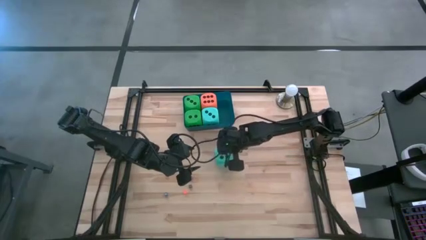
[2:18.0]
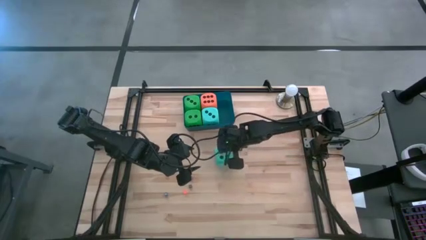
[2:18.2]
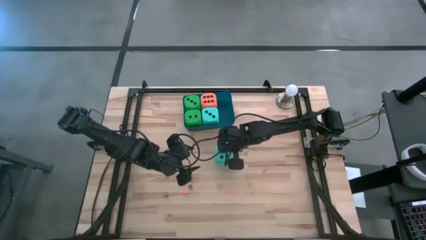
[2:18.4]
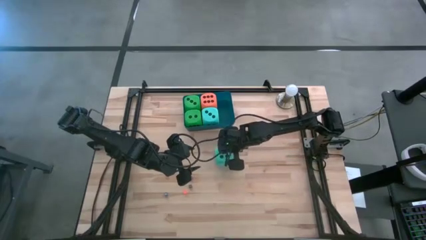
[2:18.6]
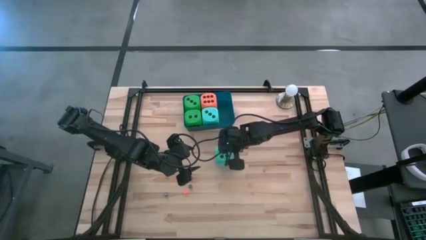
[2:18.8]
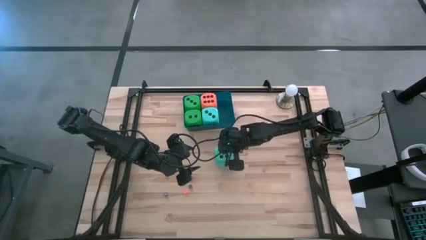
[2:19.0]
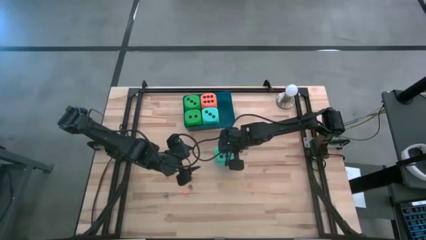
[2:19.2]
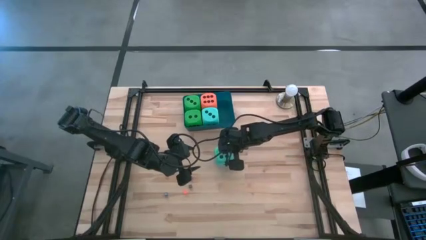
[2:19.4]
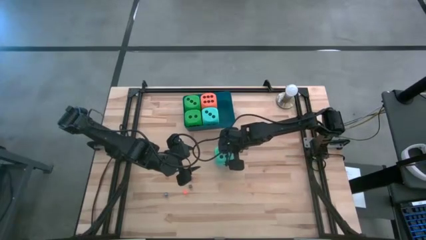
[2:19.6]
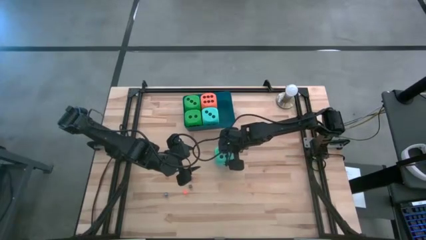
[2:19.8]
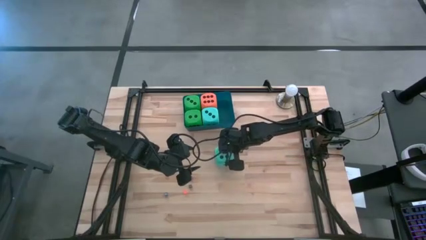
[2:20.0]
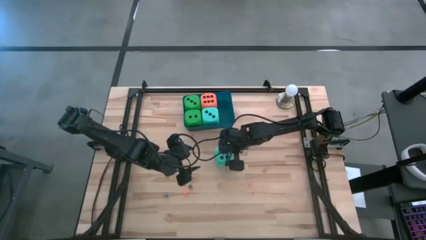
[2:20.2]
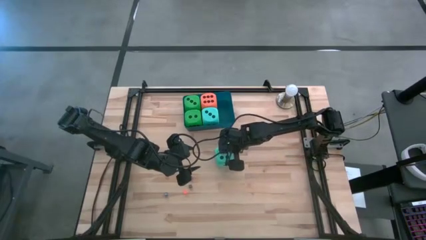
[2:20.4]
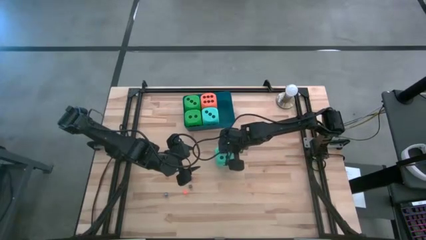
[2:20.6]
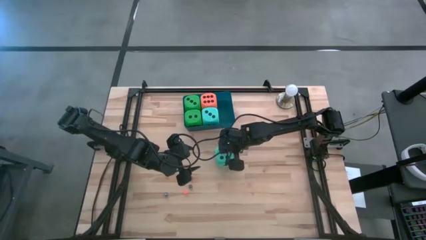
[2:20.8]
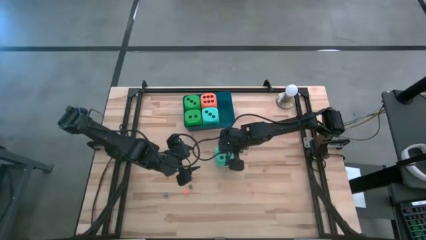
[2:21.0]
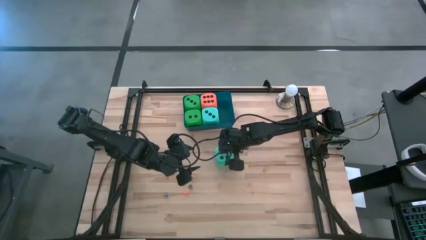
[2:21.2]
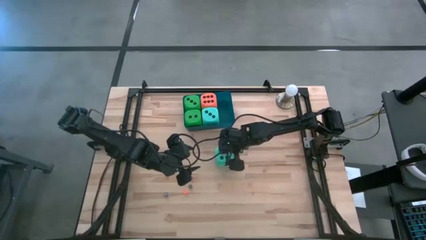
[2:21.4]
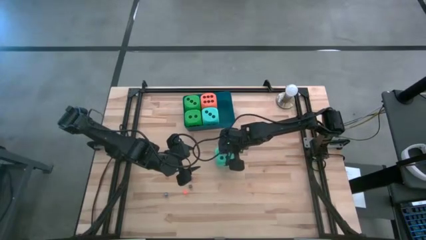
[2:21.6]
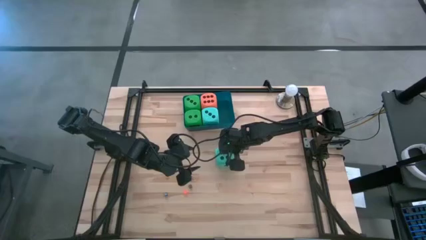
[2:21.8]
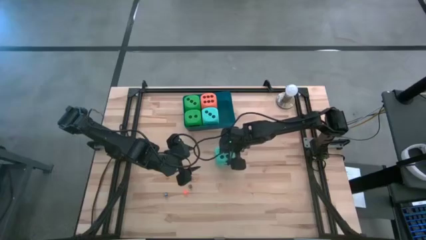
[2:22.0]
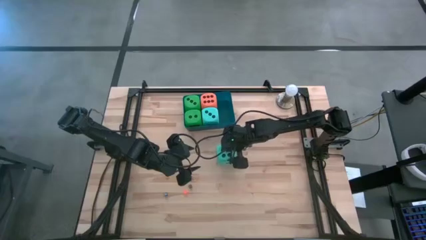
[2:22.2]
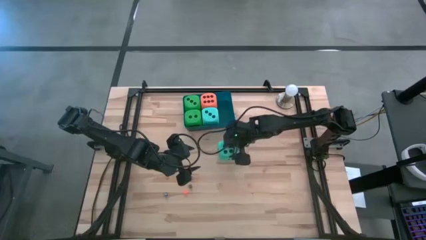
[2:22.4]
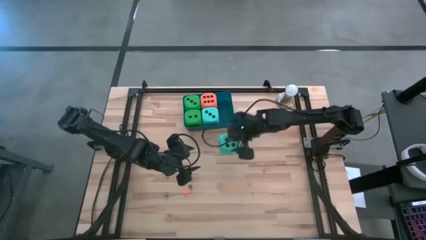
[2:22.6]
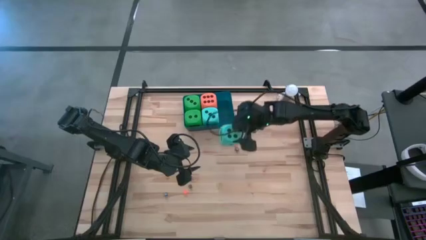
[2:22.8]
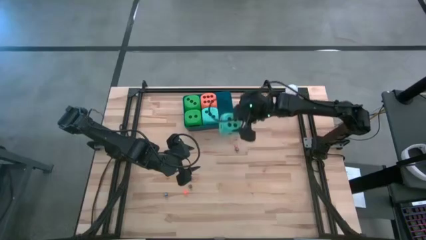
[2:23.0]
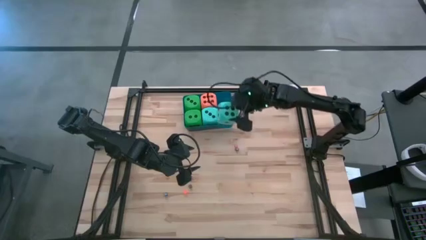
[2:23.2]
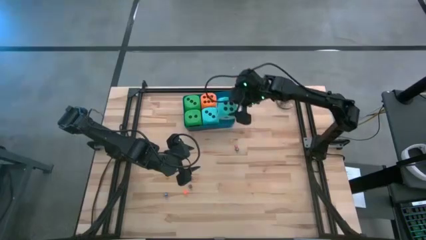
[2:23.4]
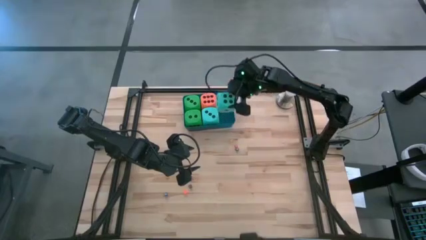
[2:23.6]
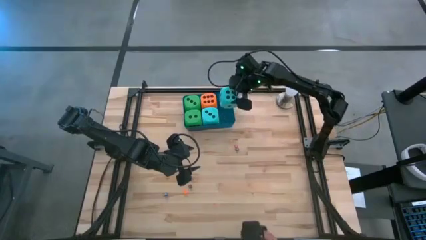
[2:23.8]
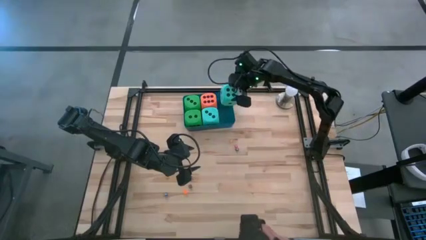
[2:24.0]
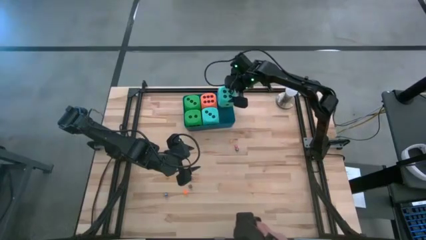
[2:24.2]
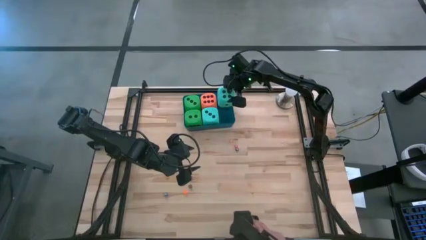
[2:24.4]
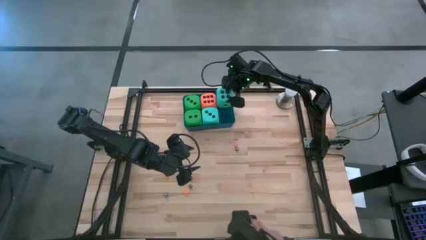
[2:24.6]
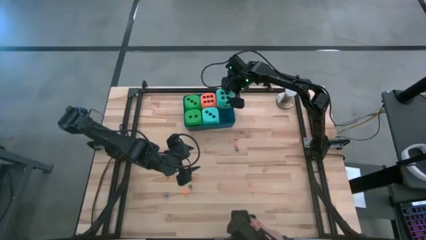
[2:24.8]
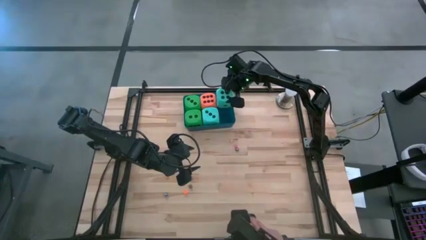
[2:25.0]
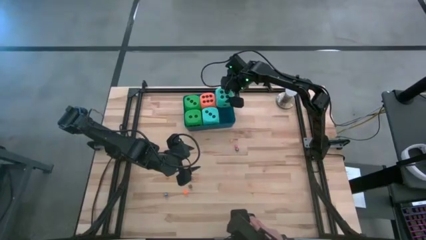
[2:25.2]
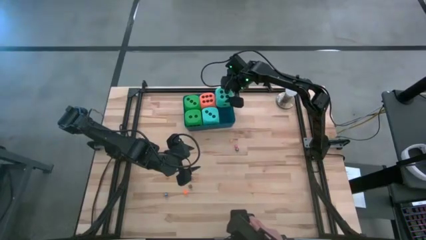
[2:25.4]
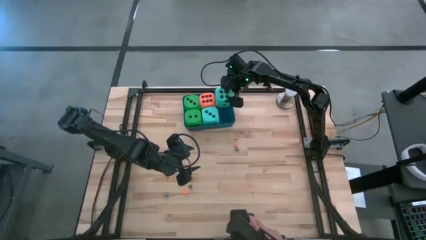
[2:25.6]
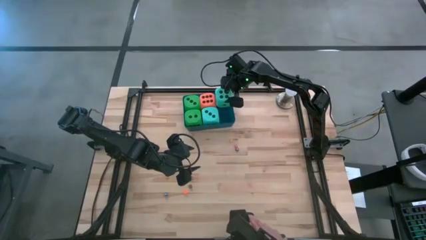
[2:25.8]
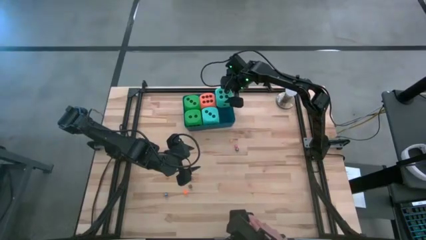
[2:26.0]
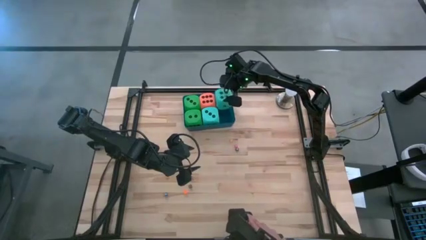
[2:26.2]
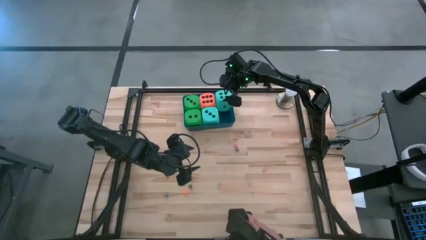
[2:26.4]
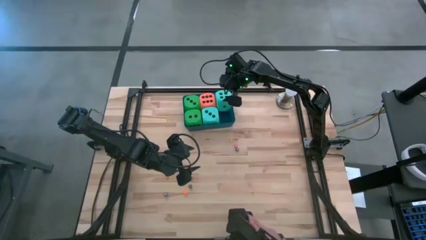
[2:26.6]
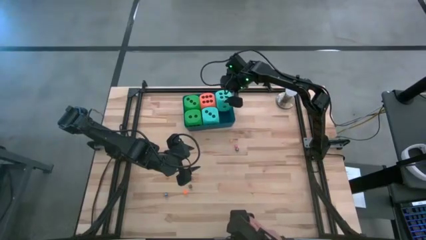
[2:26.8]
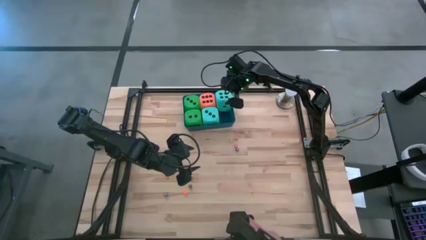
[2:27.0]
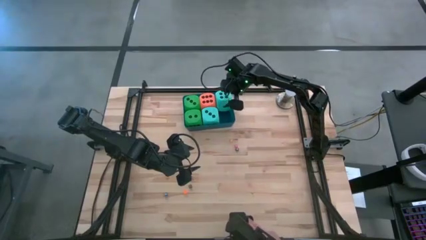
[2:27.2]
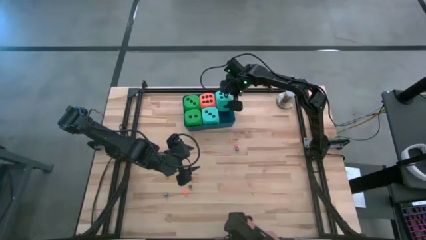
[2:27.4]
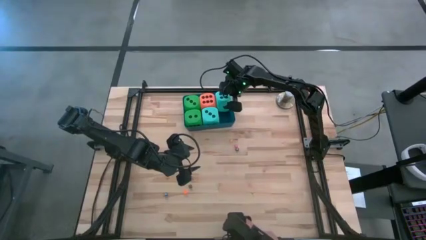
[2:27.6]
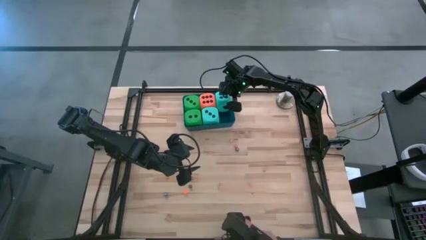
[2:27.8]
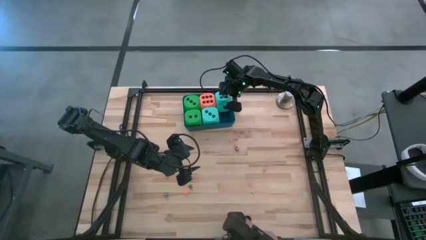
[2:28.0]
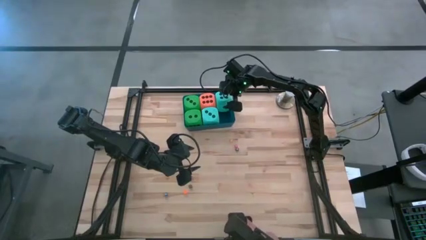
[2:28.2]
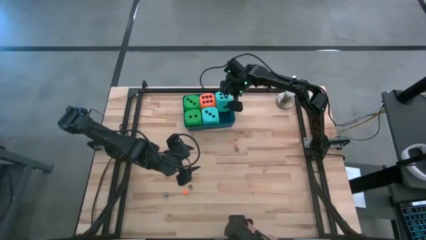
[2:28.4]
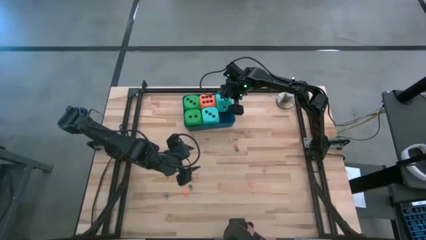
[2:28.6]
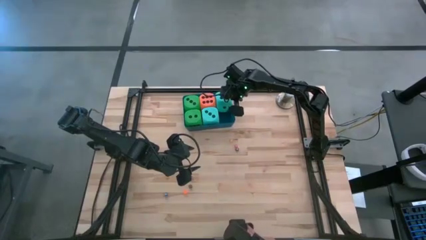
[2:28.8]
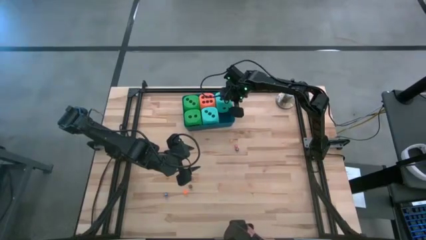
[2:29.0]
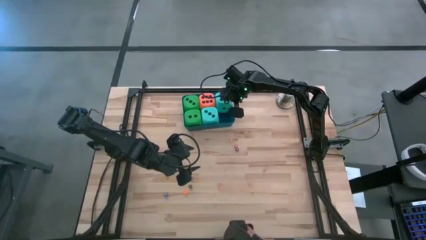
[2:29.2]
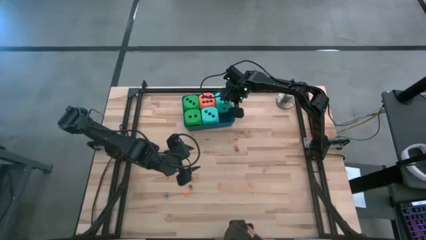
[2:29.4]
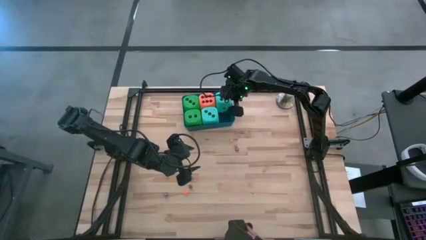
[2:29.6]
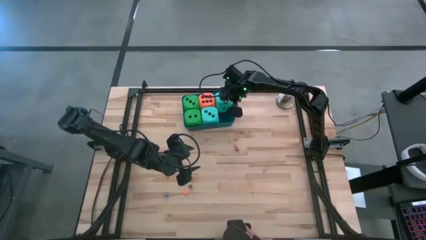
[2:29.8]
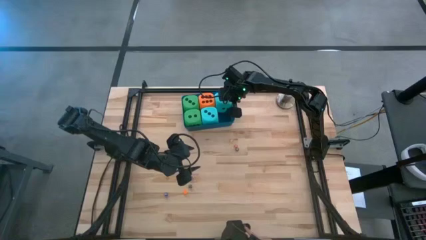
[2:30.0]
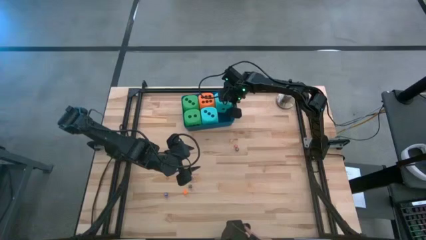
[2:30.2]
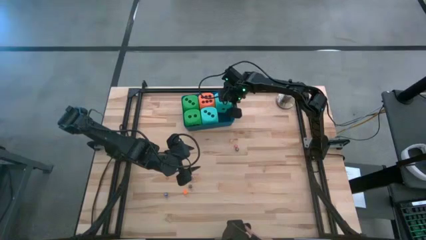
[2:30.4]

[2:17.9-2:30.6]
Task: Pick & Place Dice
Put the blue dice into the blue bin
